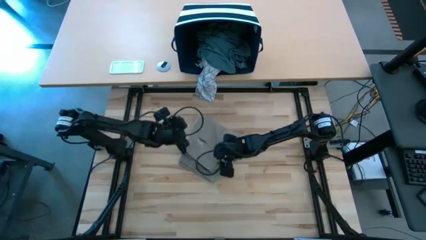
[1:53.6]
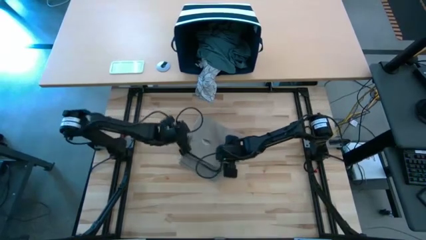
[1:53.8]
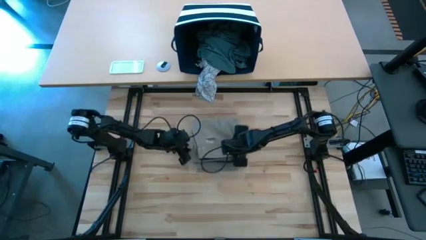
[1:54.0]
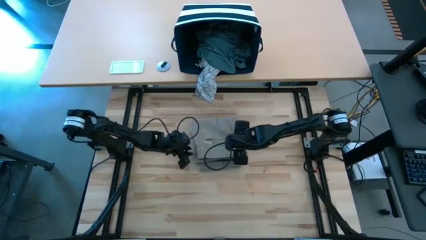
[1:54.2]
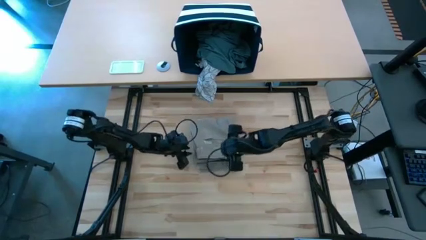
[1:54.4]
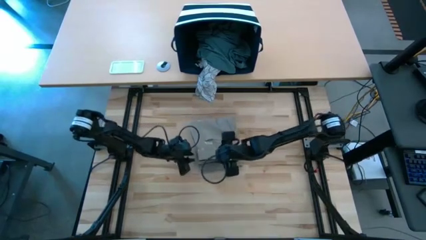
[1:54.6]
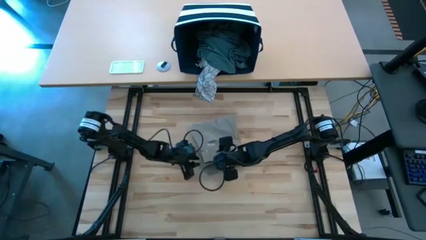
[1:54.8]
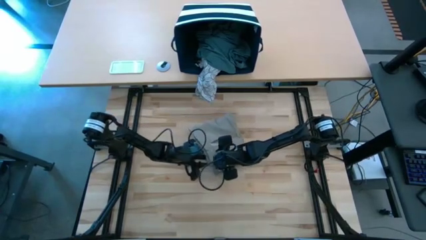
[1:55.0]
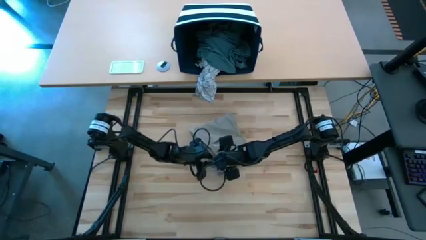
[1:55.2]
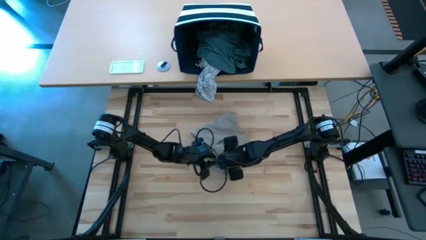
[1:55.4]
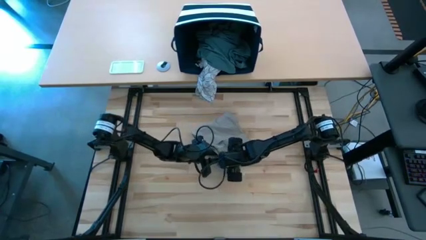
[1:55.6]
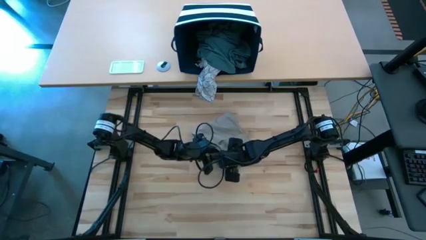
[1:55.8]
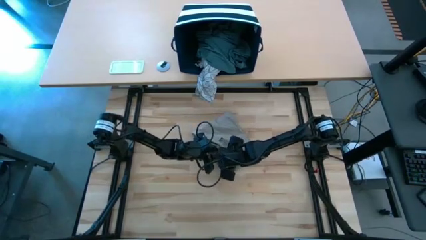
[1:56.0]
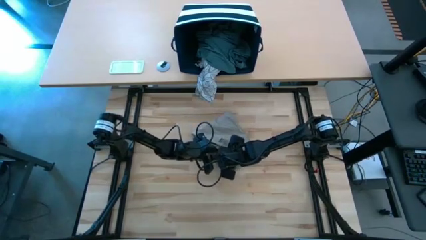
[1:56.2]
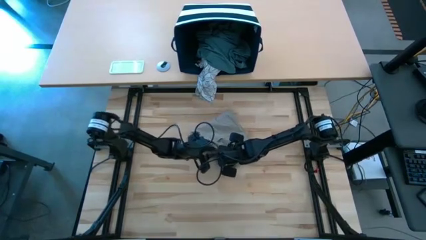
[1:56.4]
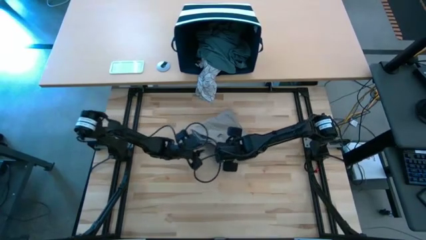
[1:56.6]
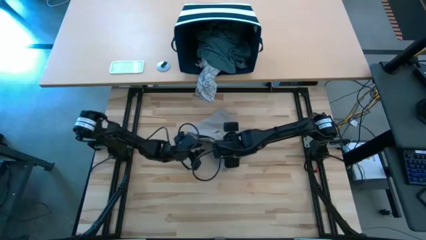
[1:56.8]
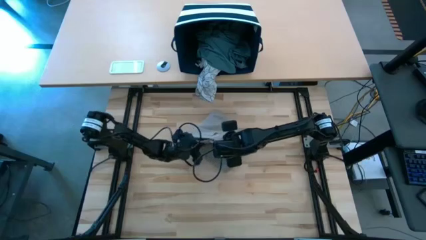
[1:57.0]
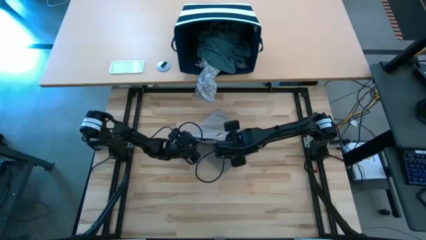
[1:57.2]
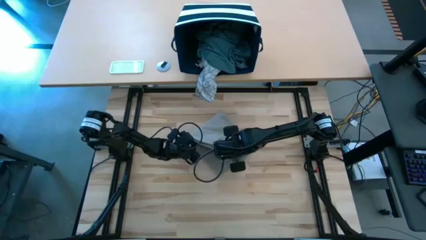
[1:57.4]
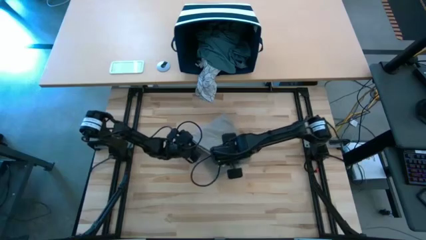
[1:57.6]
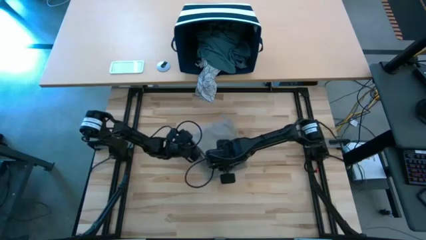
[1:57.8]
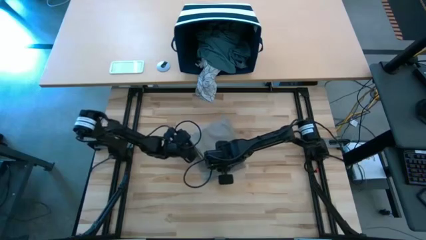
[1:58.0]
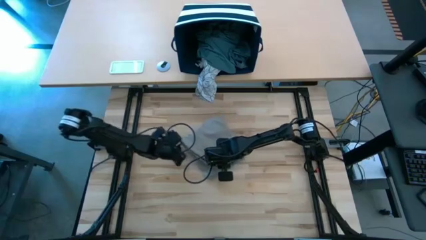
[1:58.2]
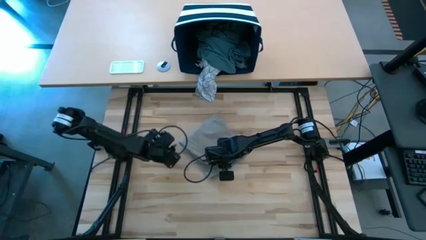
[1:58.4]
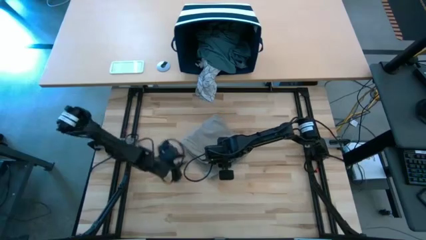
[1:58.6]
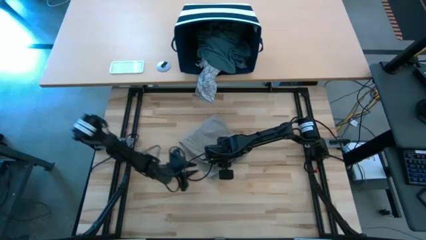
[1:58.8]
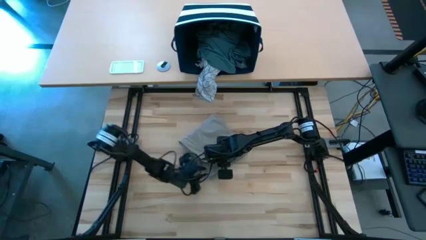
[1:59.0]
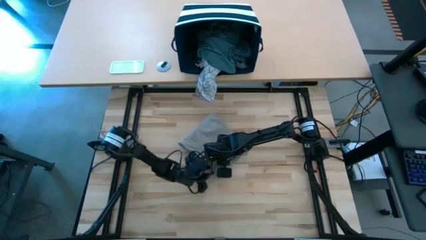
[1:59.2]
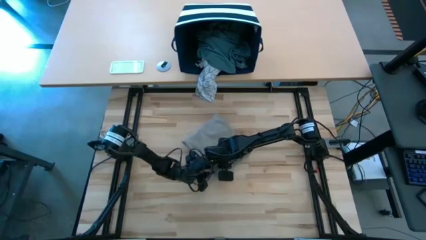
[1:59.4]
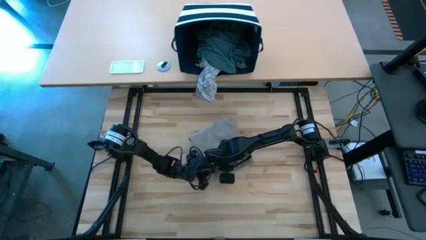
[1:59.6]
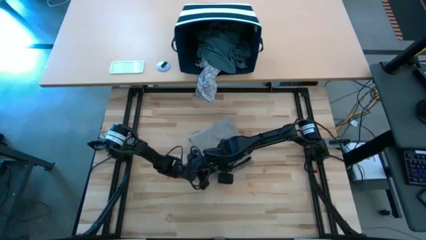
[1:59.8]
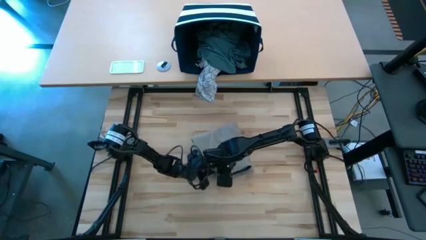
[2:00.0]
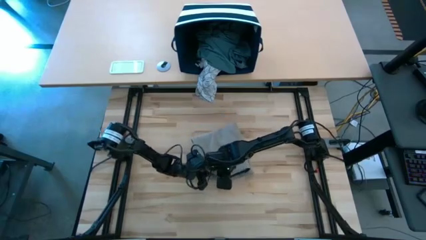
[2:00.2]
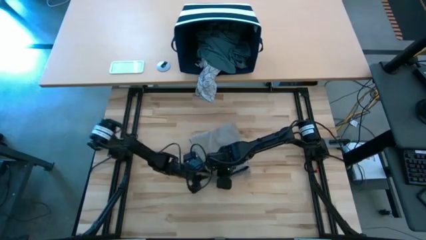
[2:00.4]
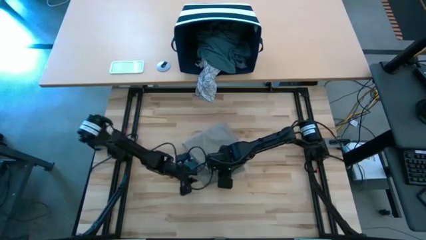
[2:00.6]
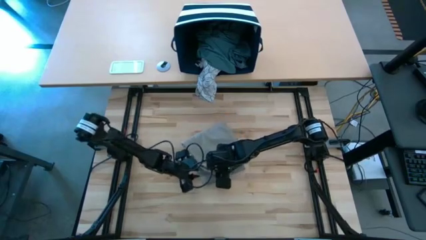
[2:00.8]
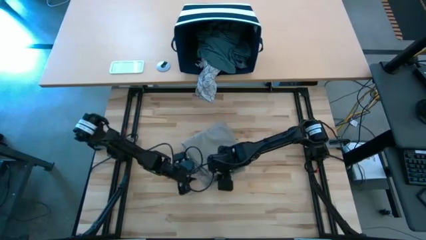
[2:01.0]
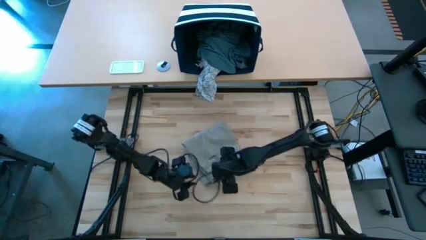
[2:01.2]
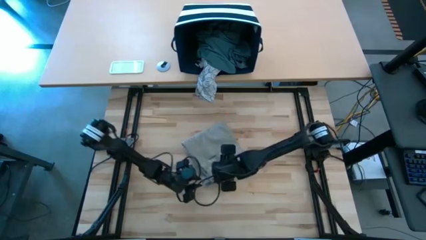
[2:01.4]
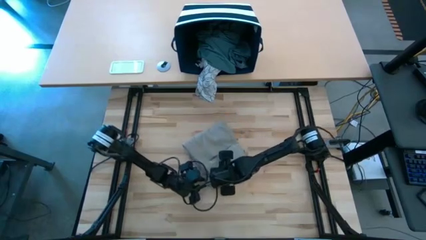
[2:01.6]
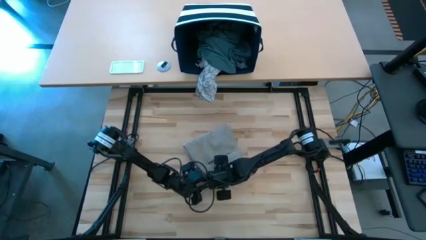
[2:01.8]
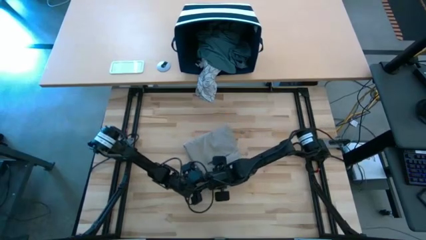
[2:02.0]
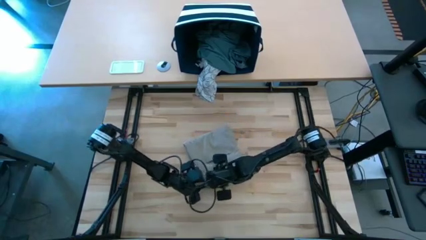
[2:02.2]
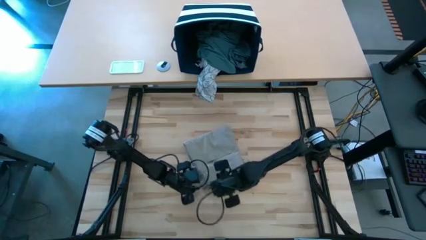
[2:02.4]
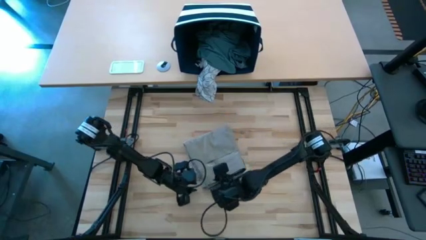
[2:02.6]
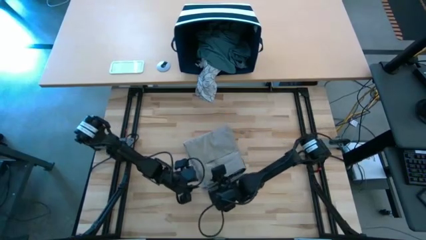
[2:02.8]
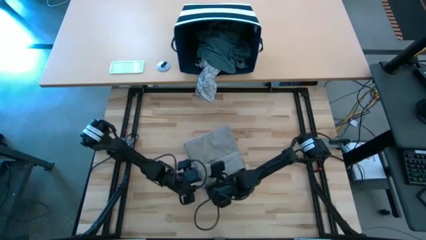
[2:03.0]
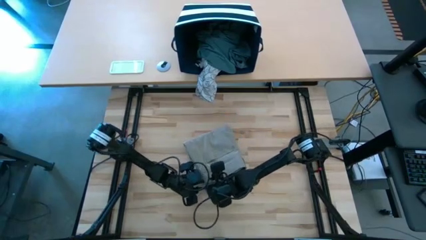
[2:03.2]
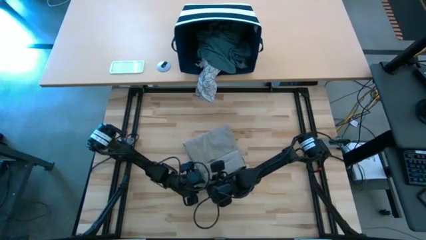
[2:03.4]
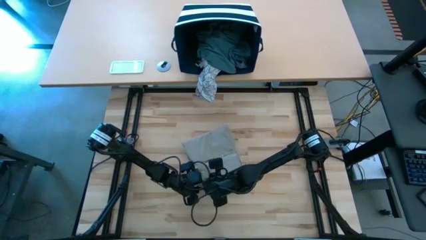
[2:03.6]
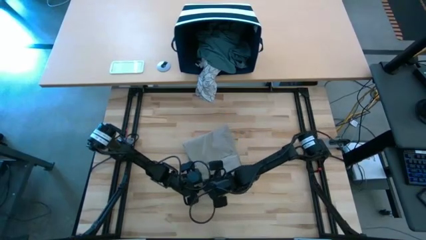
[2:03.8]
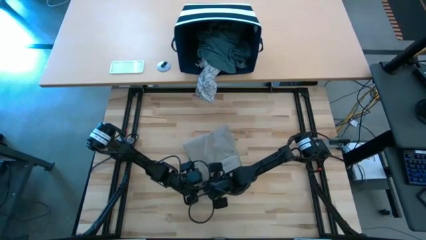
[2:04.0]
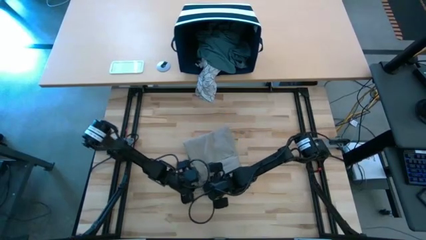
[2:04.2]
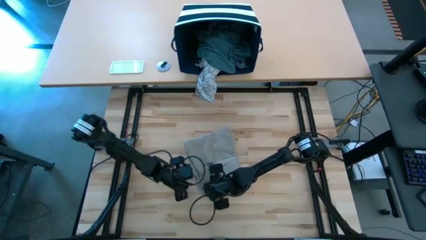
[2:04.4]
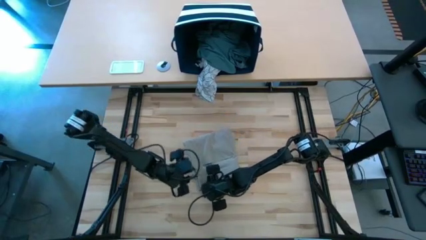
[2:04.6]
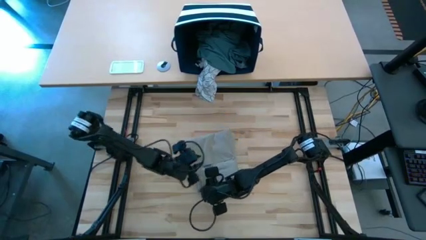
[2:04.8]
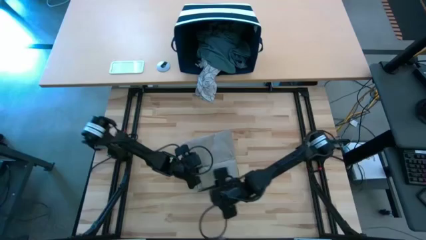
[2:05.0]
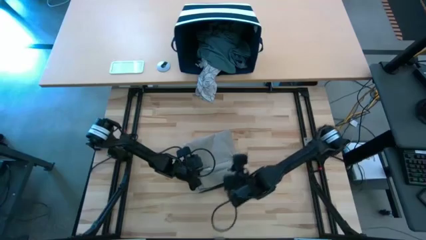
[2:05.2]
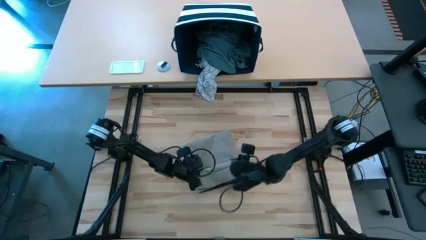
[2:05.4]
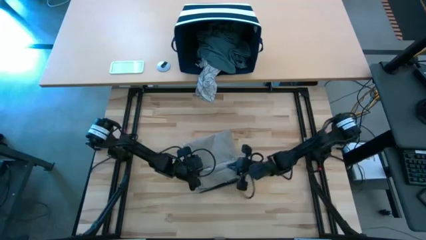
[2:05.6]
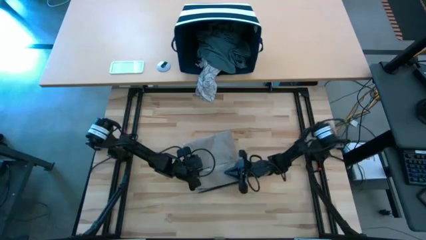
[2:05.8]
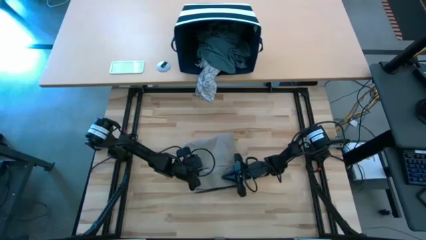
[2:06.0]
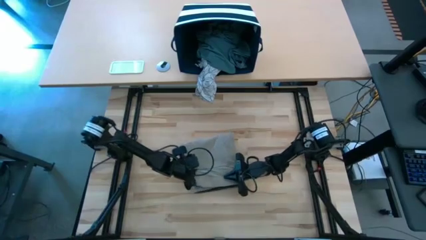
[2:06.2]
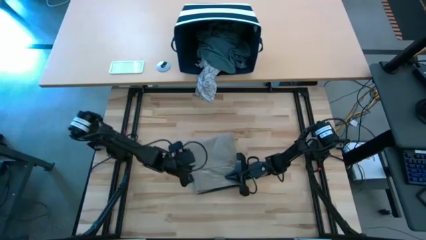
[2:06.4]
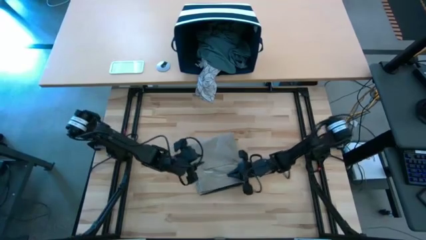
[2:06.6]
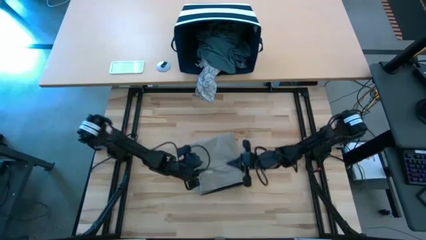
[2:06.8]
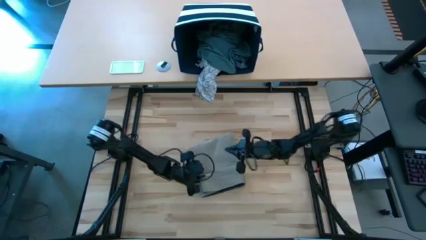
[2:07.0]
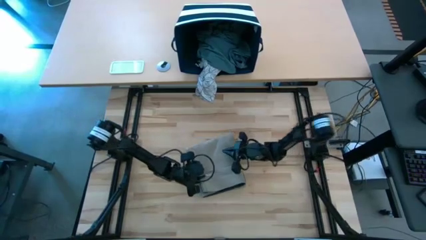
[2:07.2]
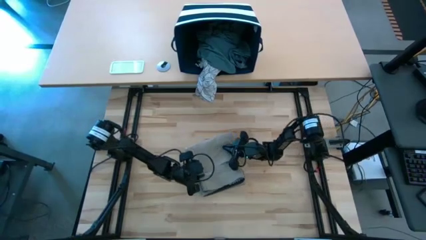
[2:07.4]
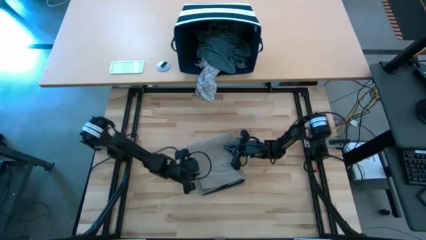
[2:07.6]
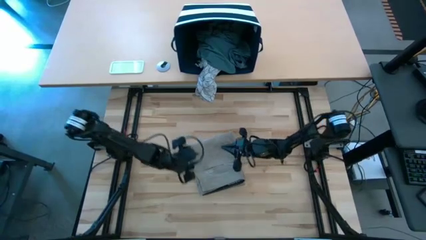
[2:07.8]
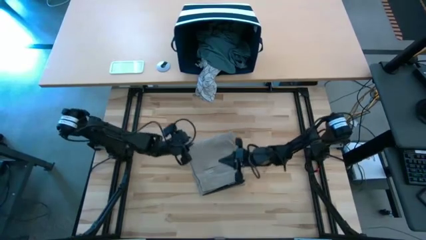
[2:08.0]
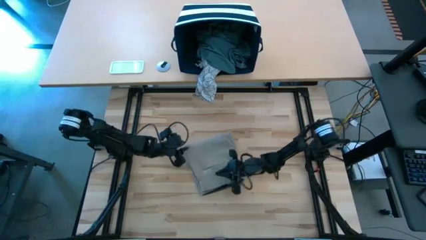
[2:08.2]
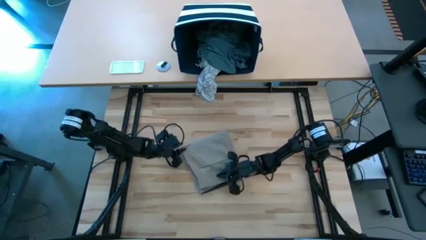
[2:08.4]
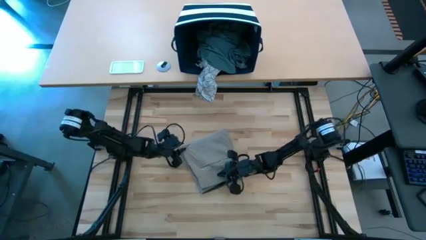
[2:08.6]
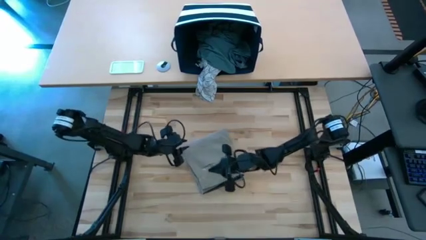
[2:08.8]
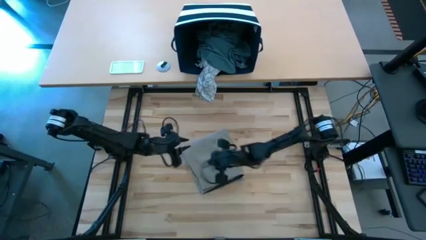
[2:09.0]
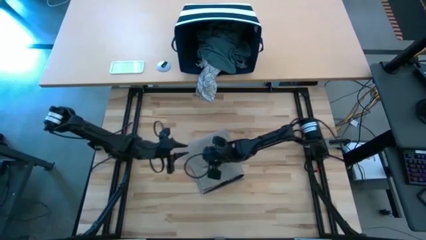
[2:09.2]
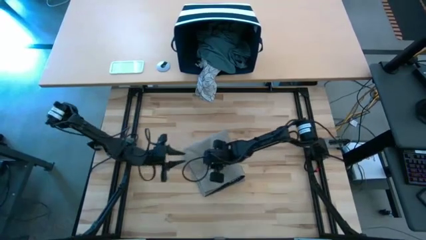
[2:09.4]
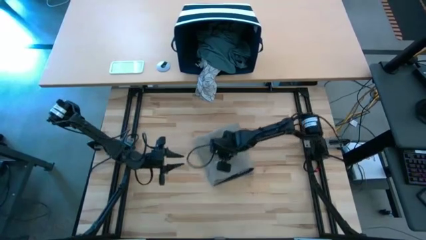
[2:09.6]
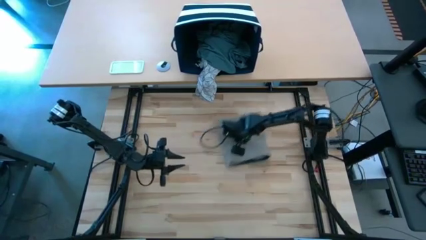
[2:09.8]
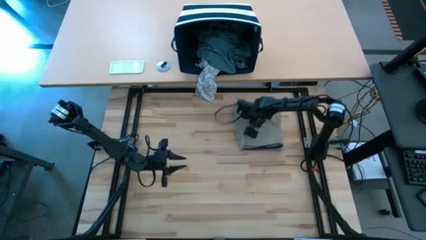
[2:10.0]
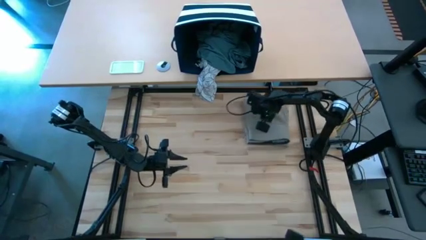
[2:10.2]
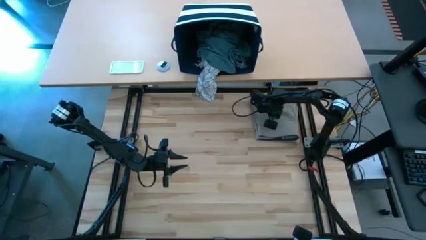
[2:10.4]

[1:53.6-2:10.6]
Task: Fold Laundry from Bin
Fold the brown shorts from the blue laundry basket
